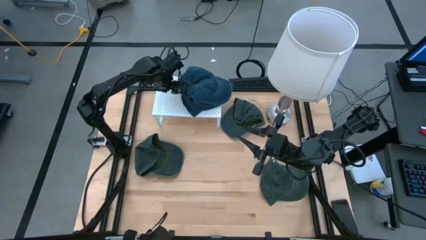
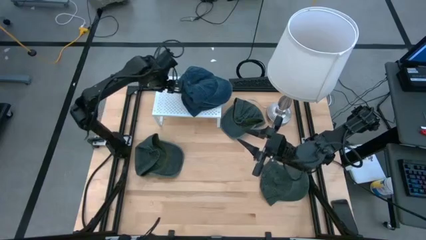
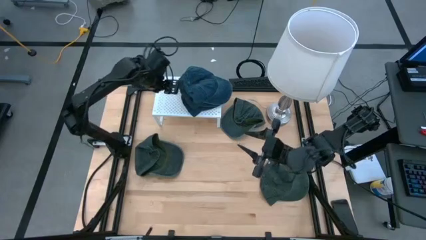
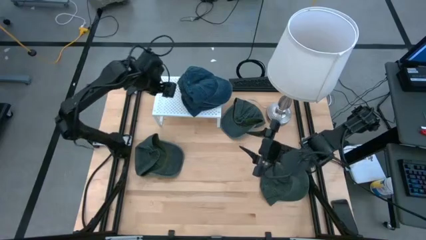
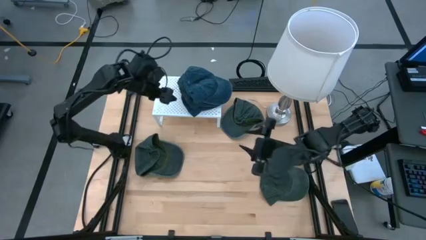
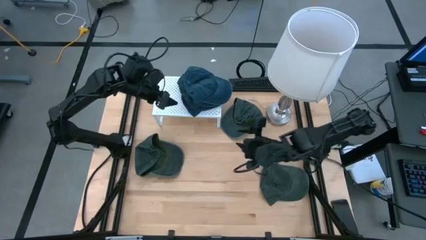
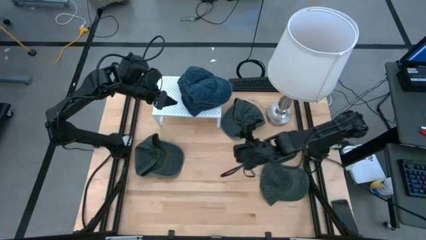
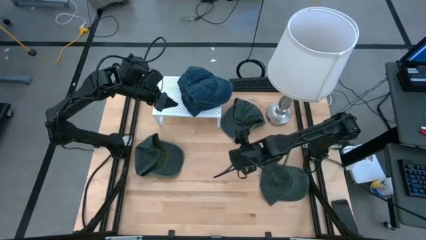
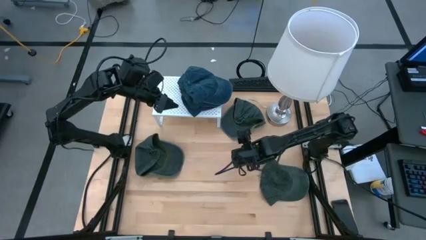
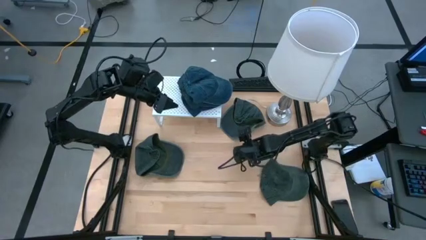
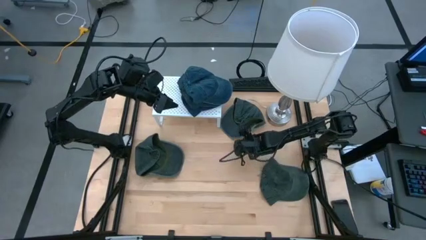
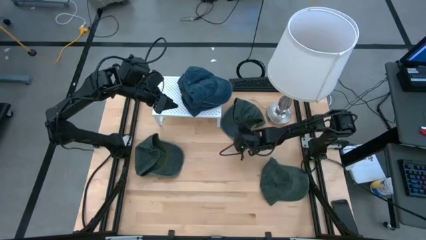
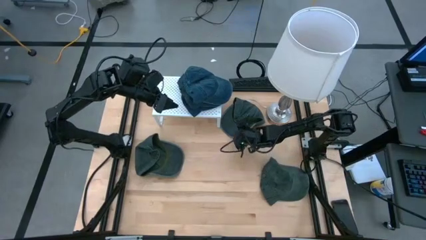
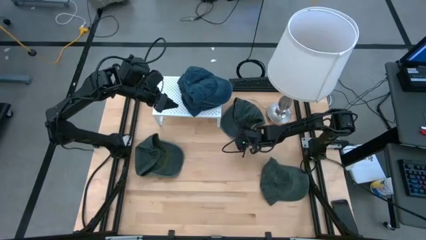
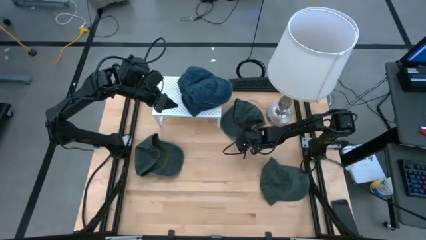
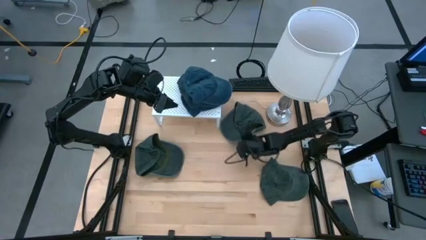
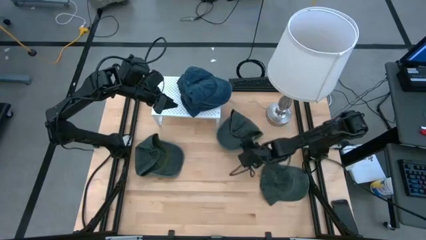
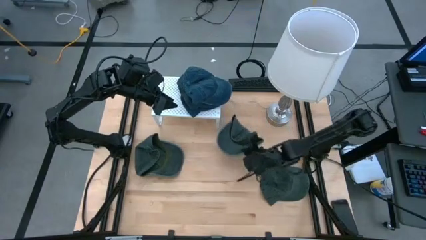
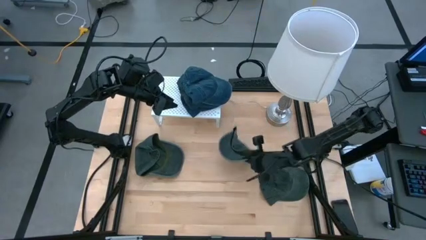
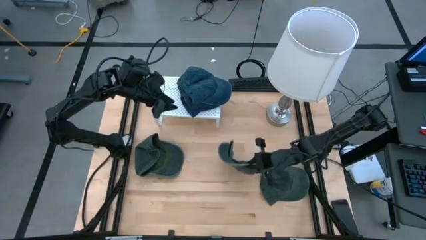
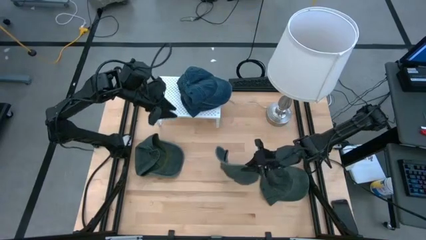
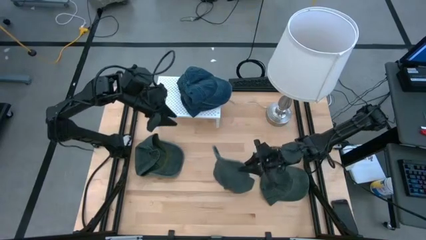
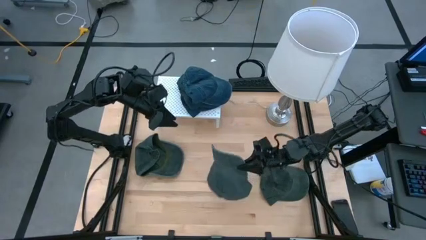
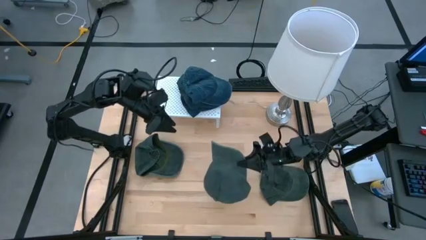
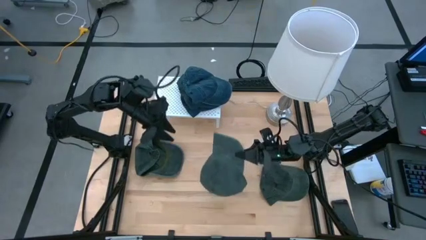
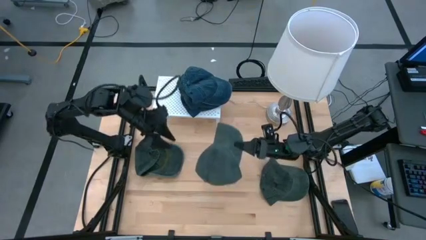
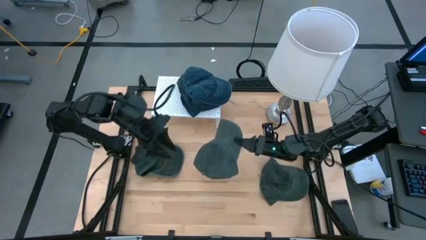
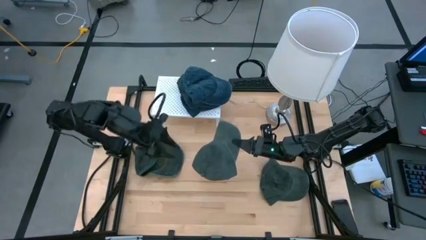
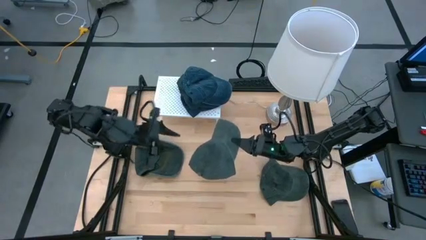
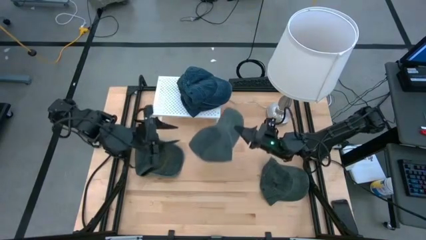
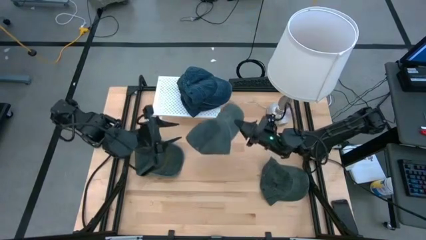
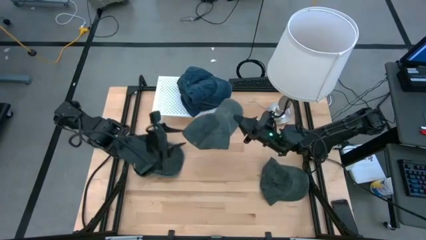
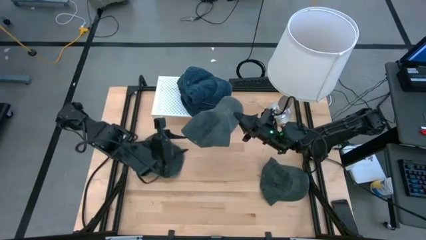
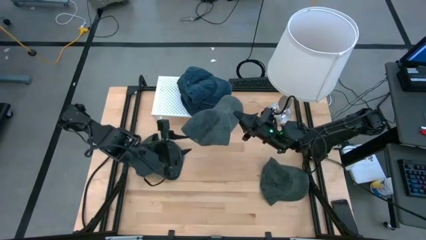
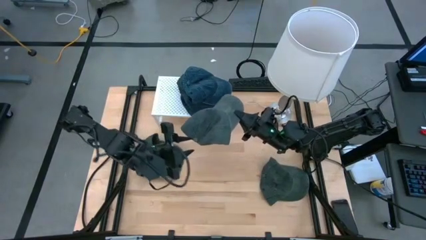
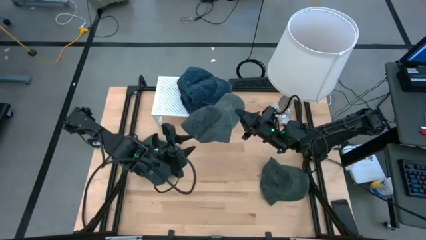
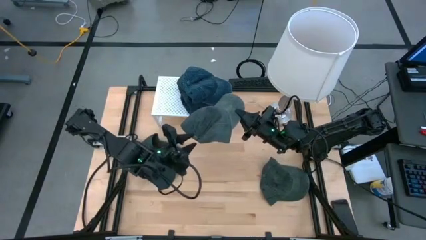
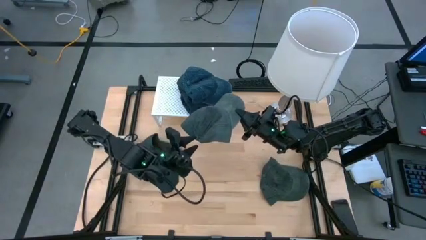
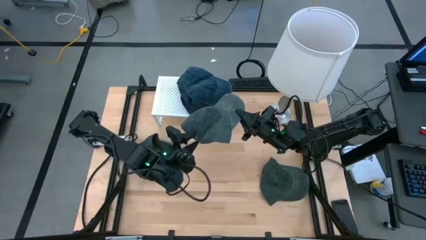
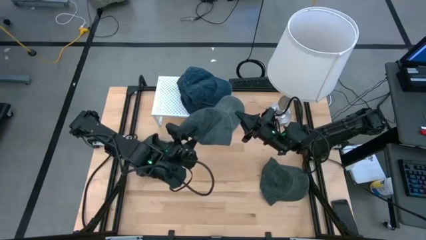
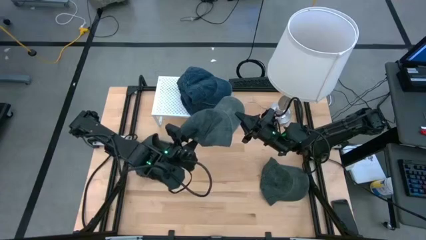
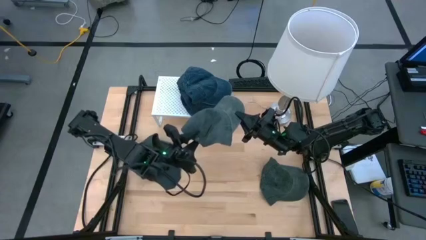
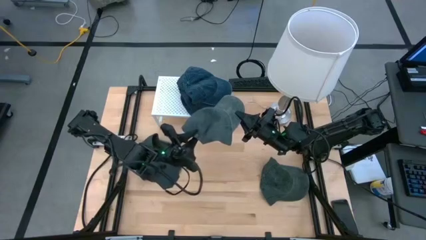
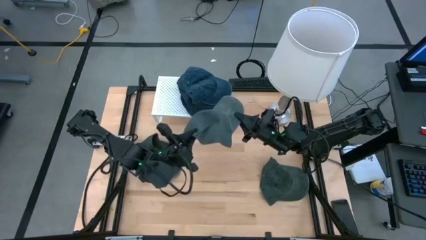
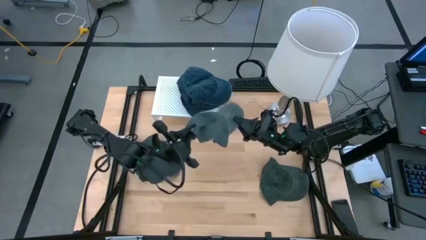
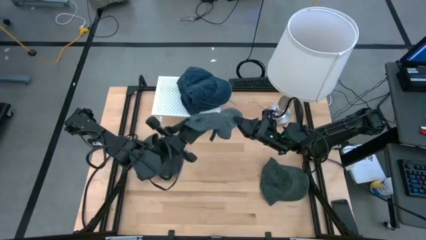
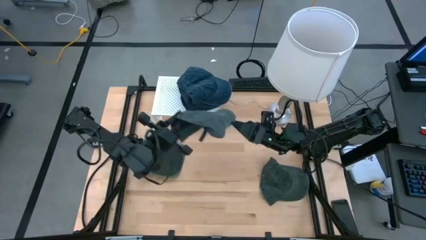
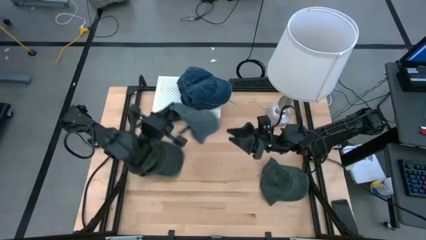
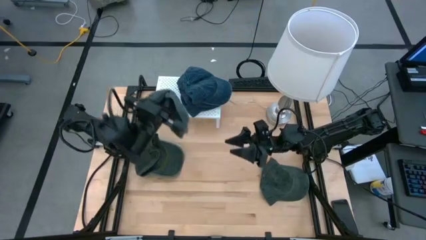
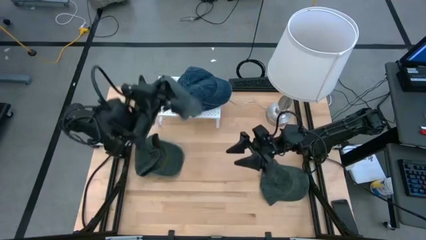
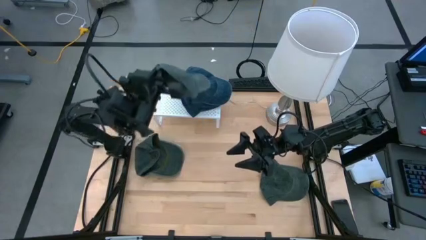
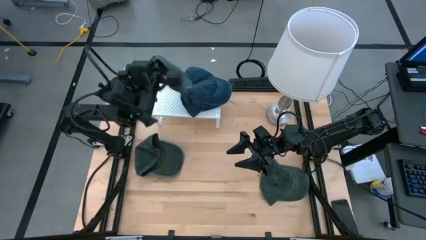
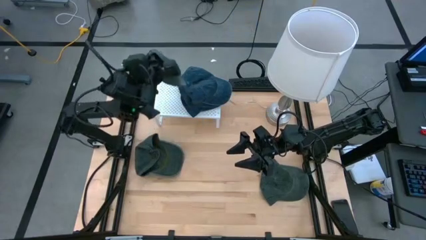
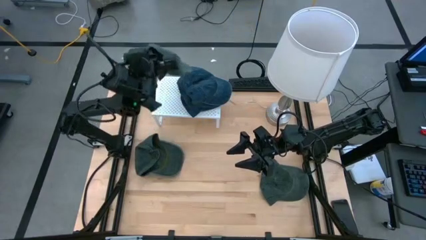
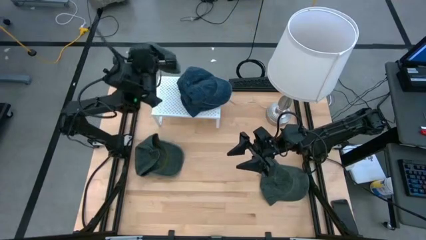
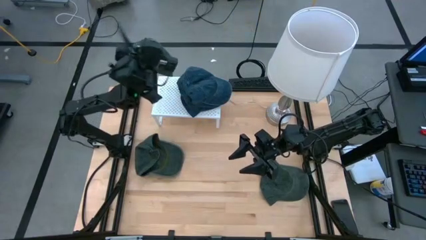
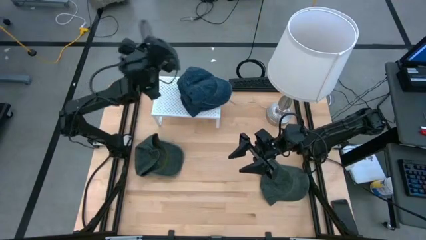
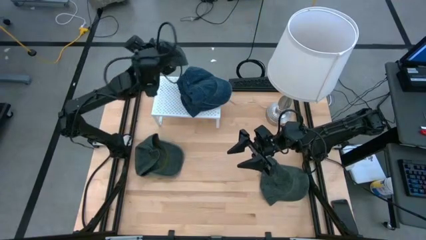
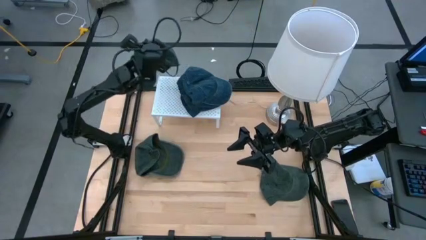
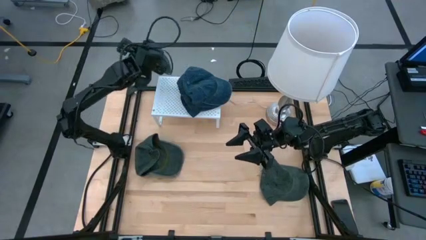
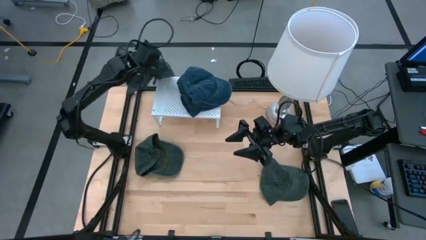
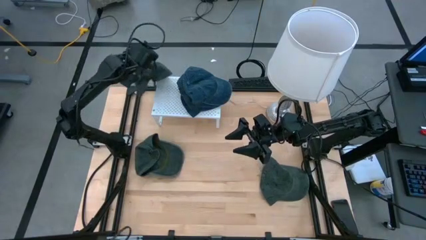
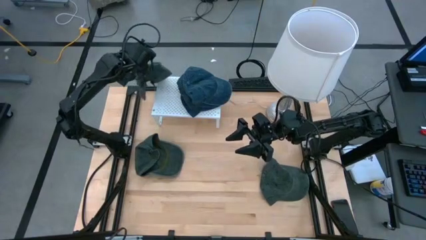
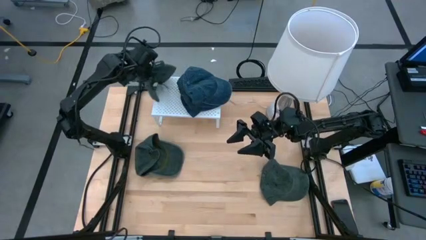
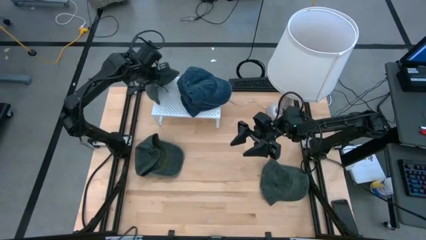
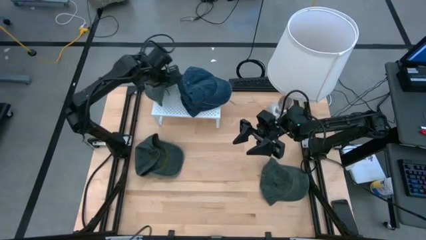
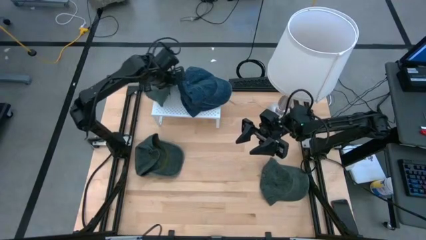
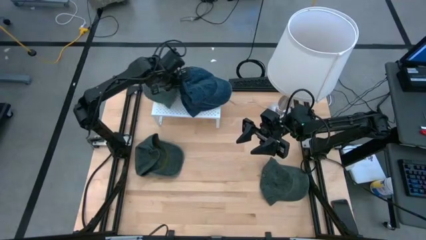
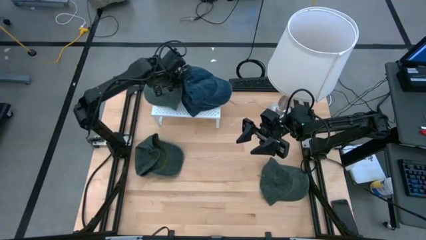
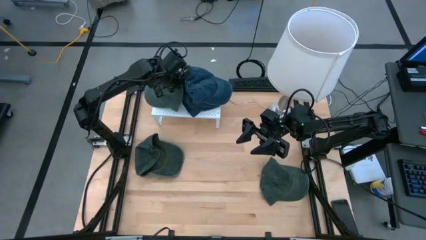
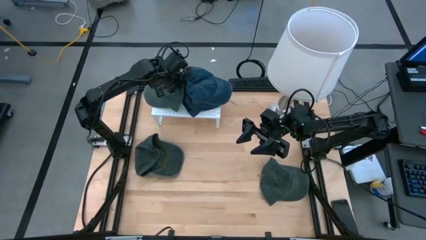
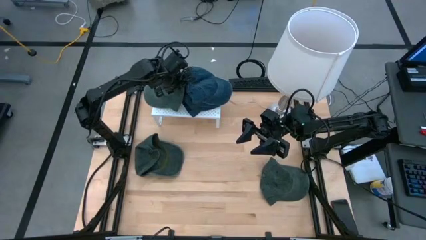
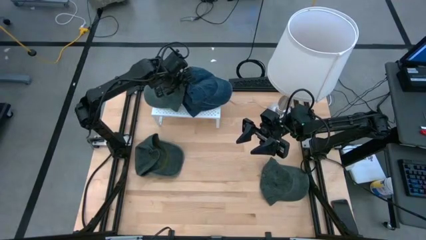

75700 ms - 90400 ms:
Task: Pick & Place hat
Put the top gray cap on the shelf
